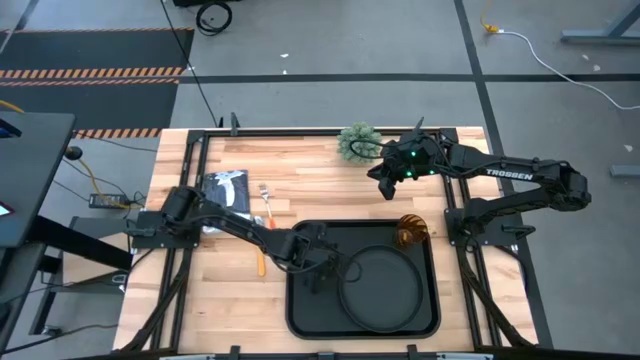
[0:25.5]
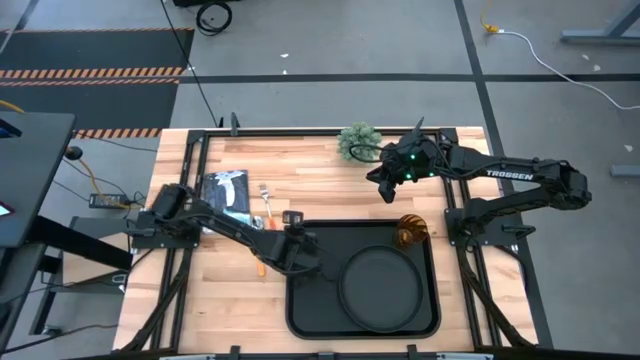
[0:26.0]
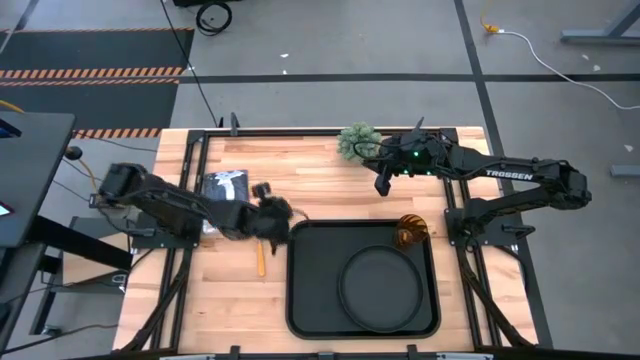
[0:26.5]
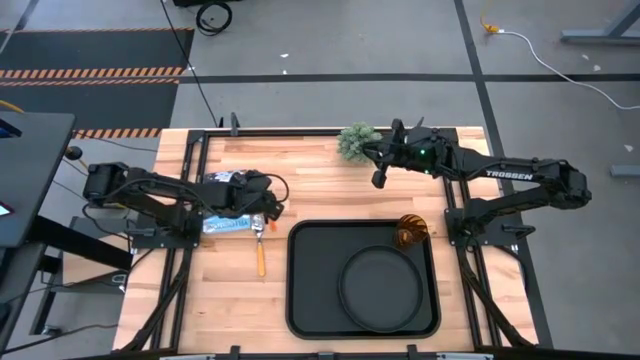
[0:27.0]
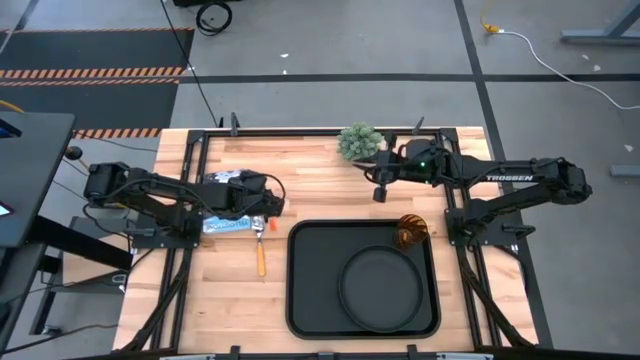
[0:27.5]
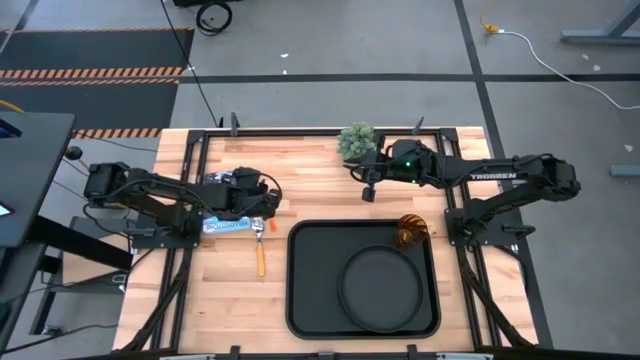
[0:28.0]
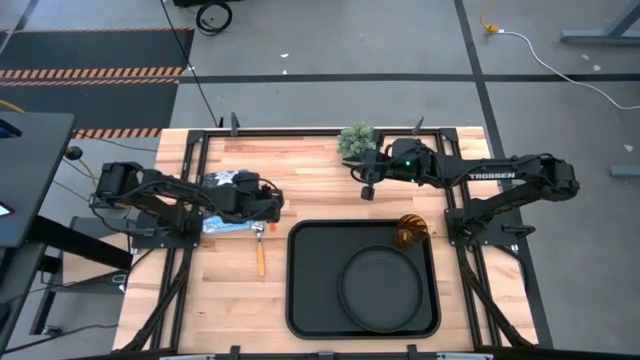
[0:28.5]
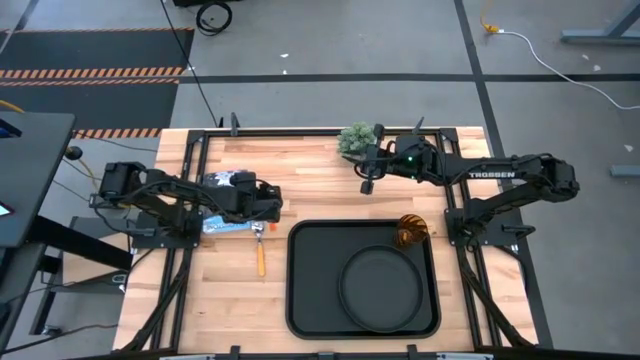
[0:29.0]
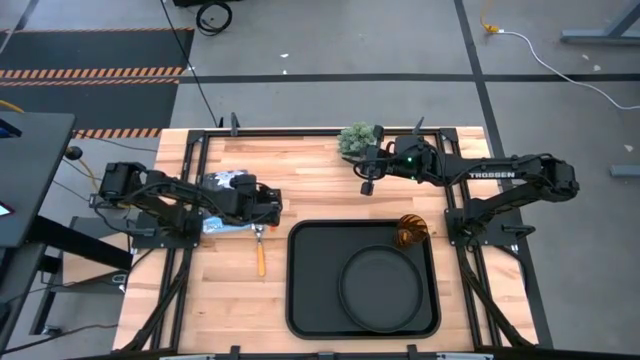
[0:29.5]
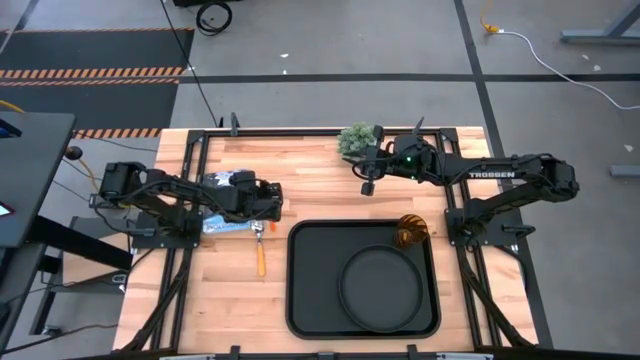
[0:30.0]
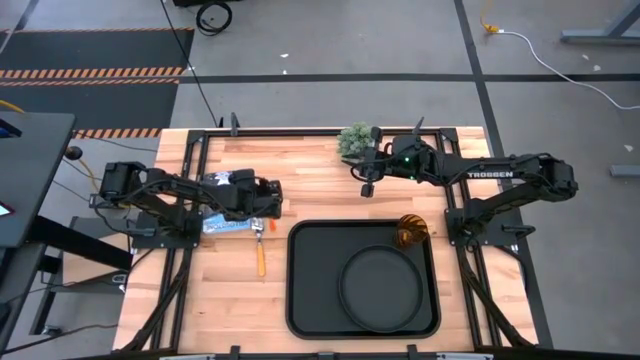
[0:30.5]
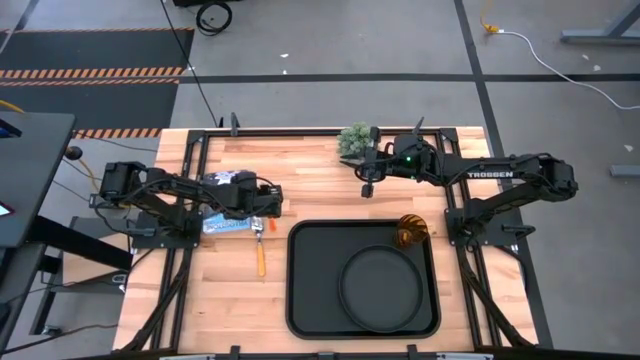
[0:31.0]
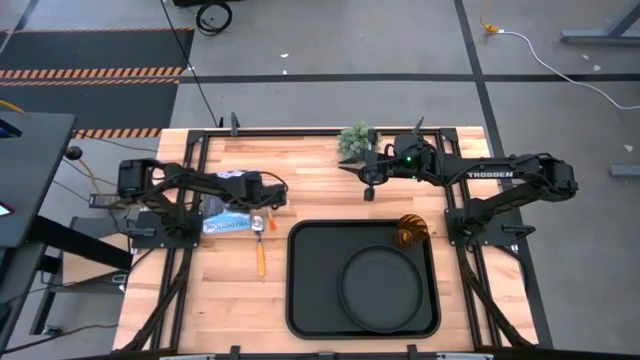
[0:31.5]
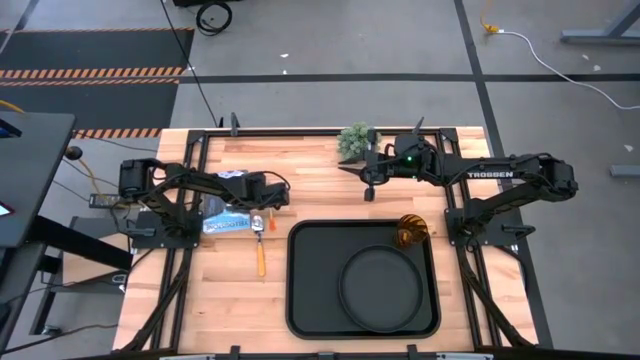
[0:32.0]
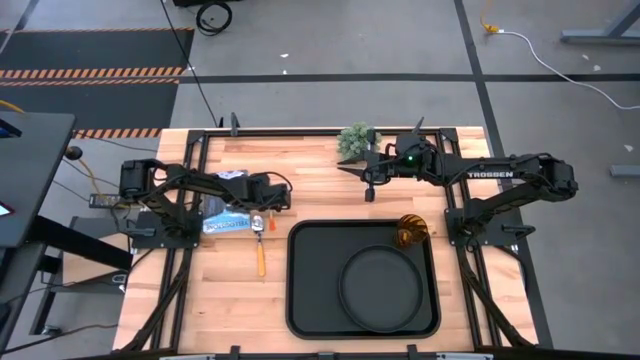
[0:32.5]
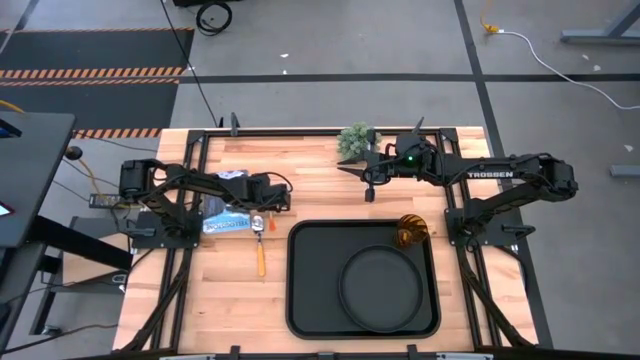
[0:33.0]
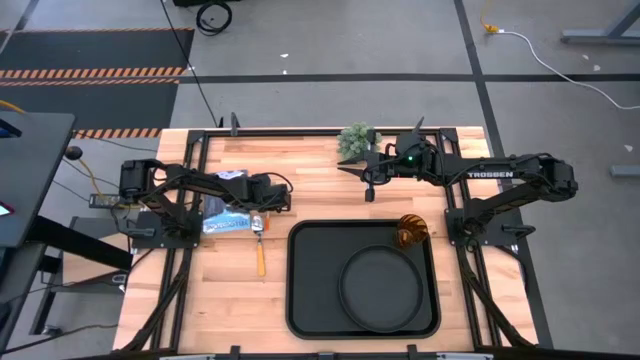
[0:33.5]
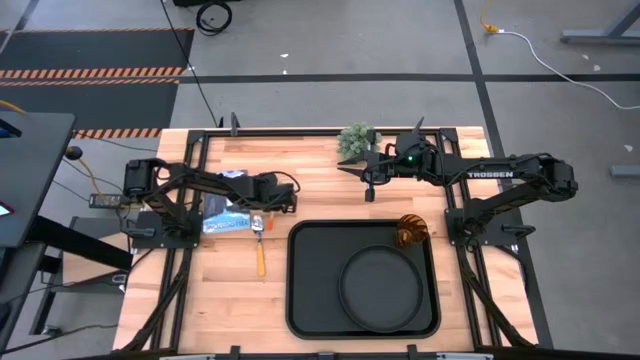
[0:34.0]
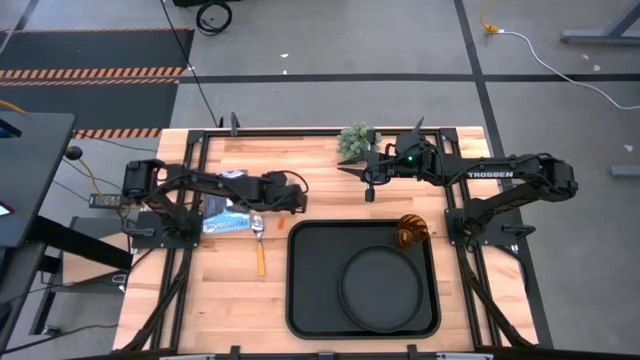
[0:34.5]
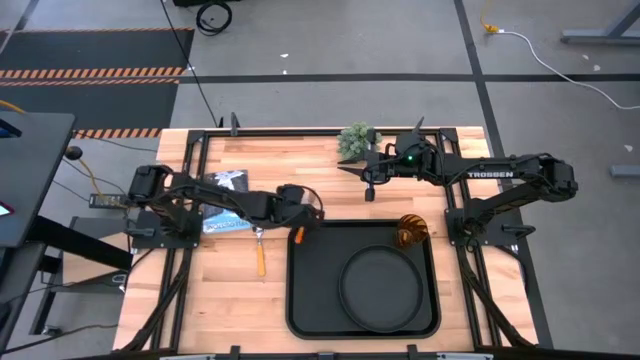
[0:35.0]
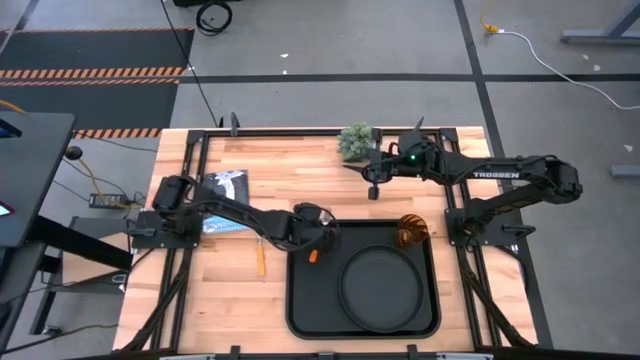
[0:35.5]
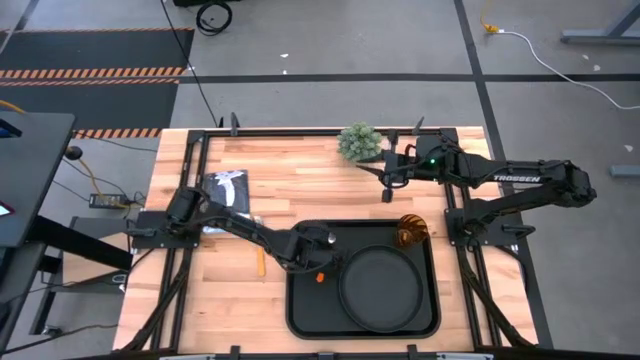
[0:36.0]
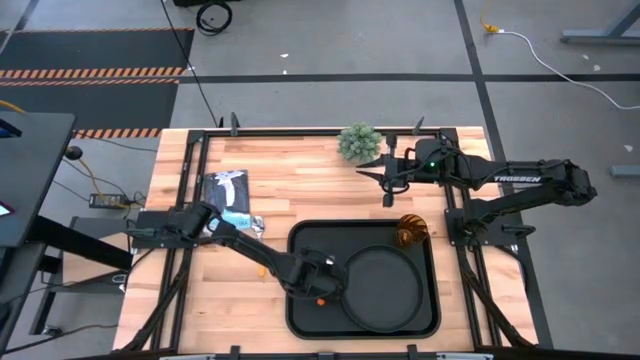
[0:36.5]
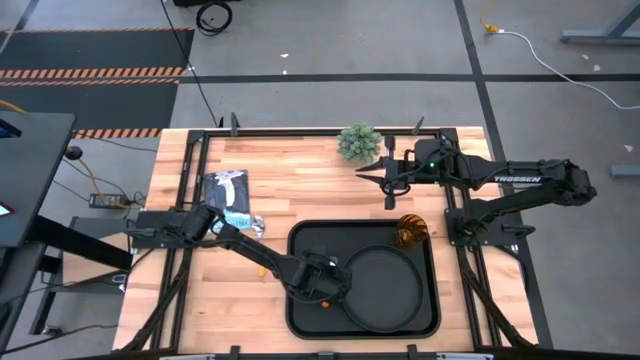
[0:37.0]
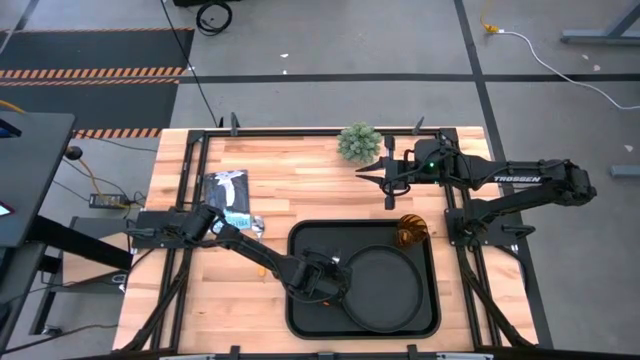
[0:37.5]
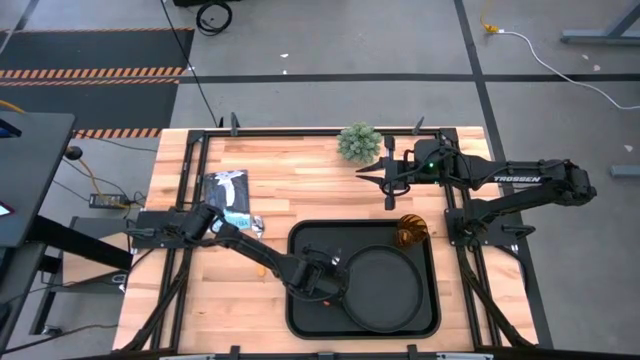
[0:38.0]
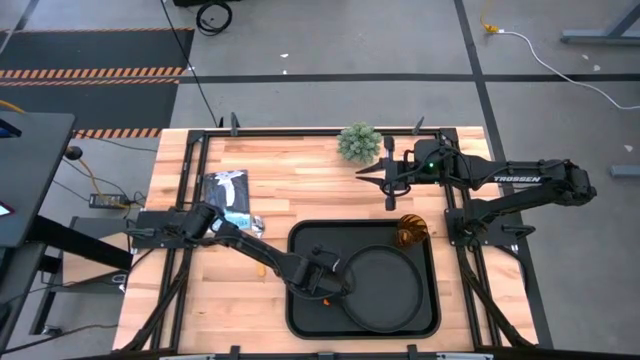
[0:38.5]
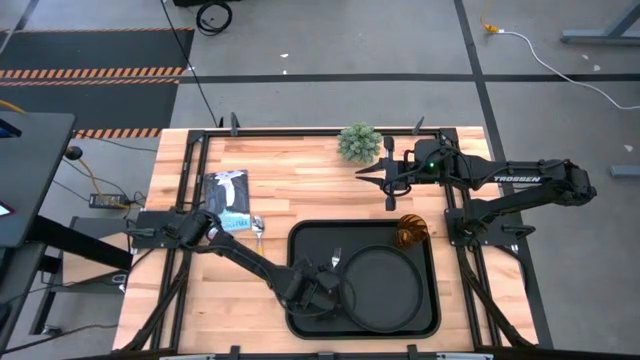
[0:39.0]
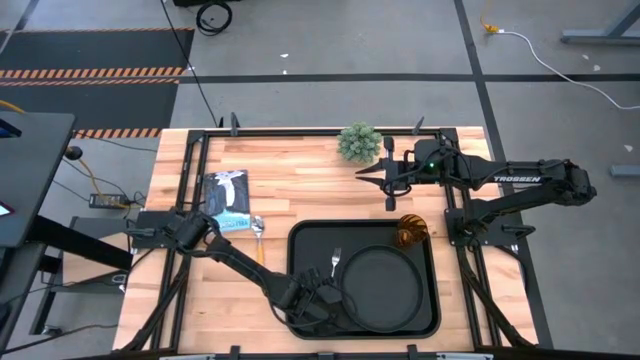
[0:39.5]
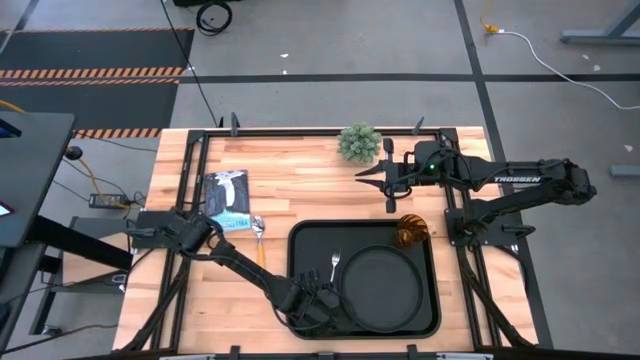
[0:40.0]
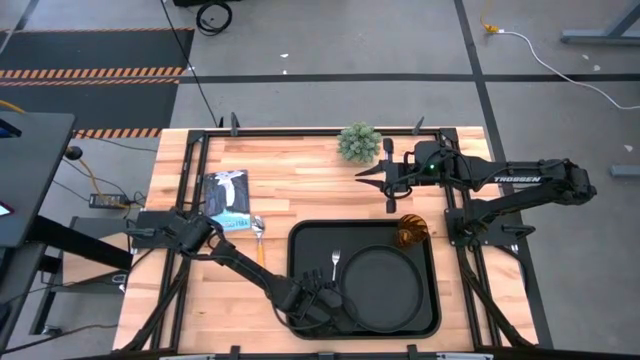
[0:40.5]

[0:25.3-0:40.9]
Task: Pick and place plate/cup/fork/spoon on tray
Put the orange fork on the black tray to the left of the black plate

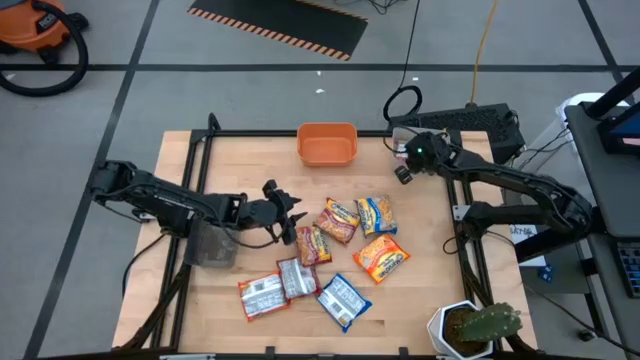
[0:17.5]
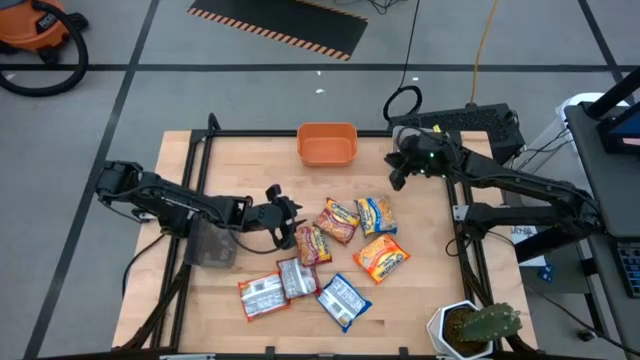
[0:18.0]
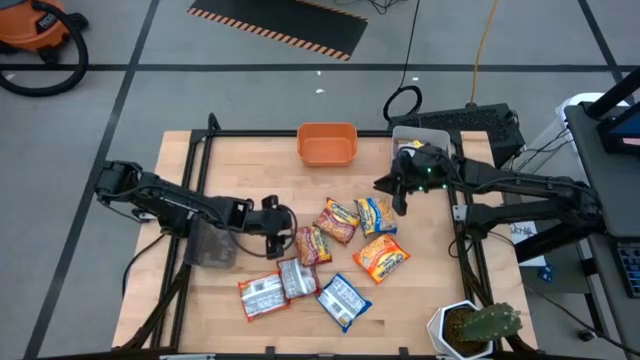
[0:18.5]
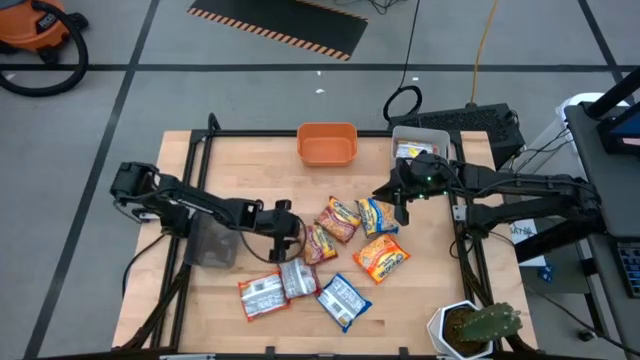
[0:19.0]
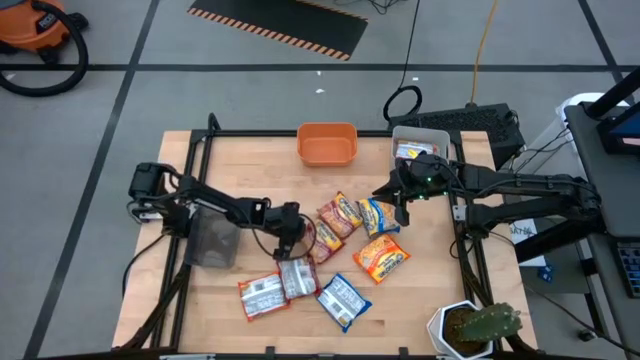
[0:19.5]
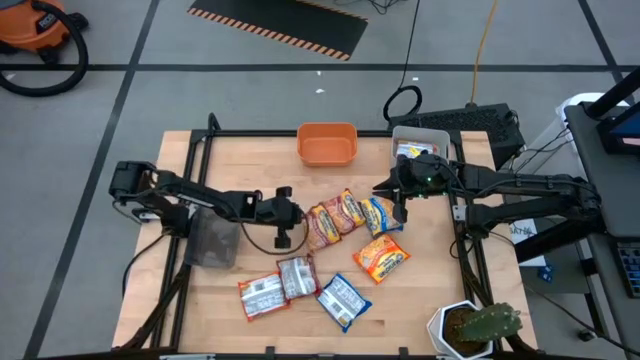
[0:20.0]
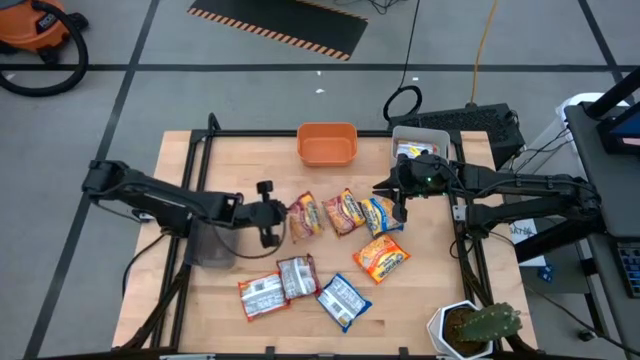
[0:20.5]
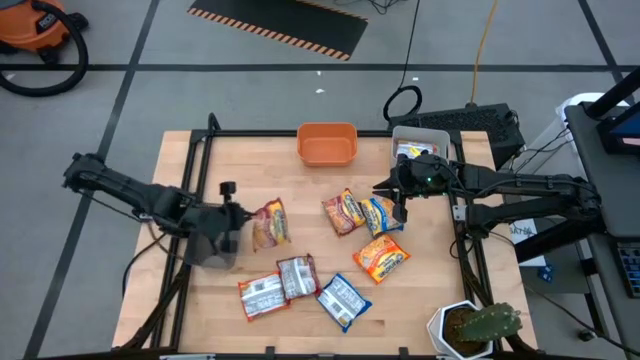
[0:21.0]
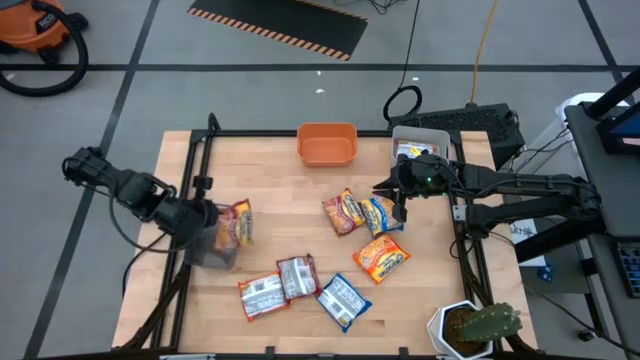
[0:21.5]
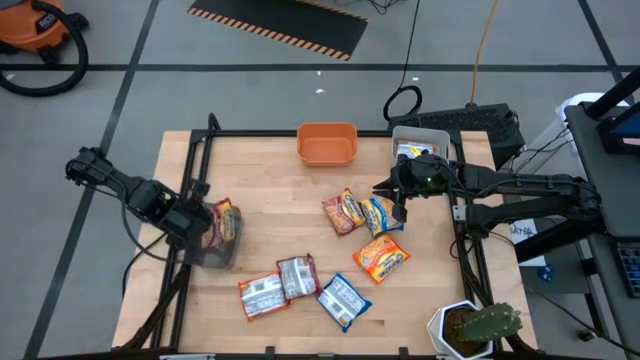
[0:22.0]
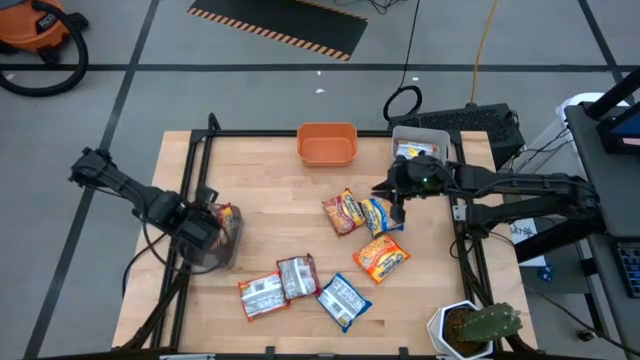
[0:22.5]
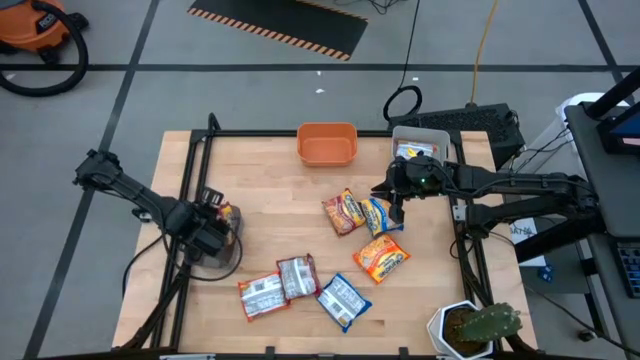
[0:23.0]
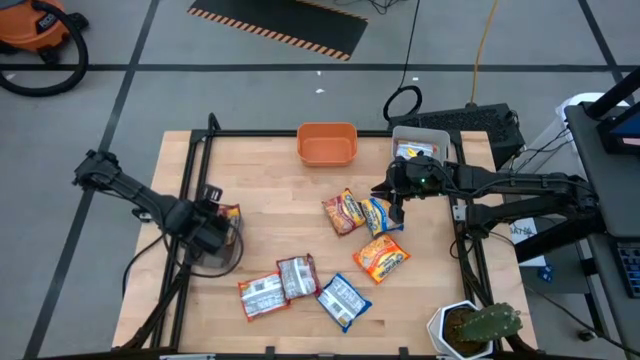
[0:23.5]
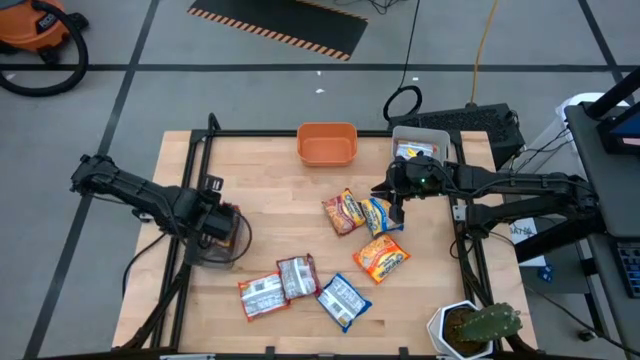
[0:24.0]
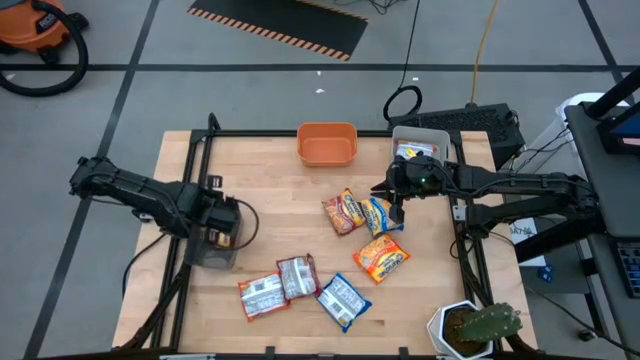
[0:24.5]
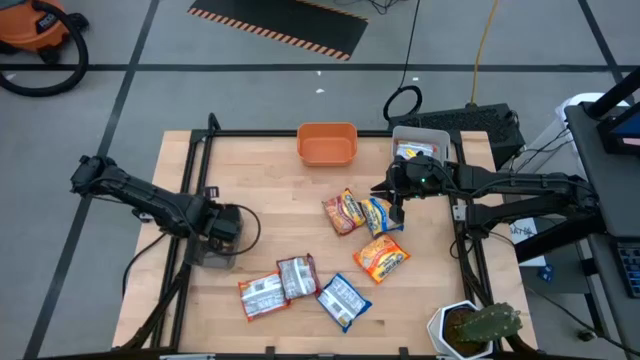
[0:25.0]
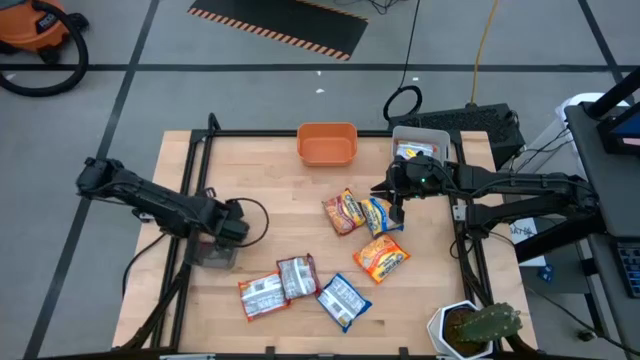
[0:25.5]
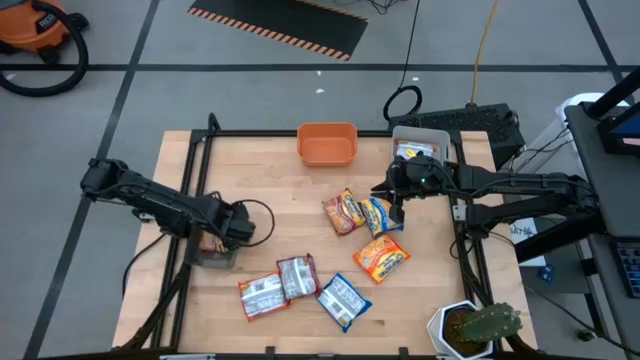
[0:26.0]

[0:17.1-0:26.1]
Task: Sort Maruchan noodles
Put the middle red noodle pack into the black bin
